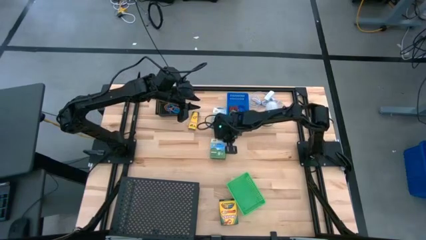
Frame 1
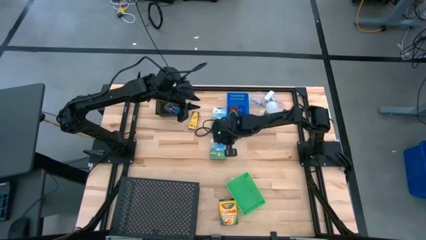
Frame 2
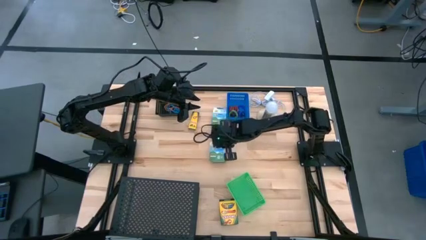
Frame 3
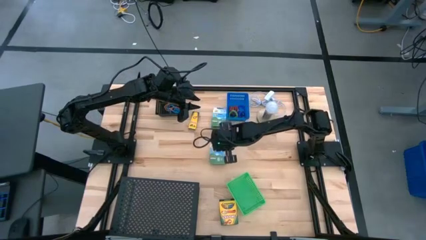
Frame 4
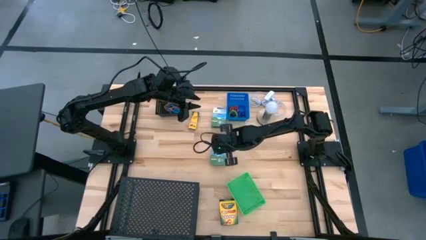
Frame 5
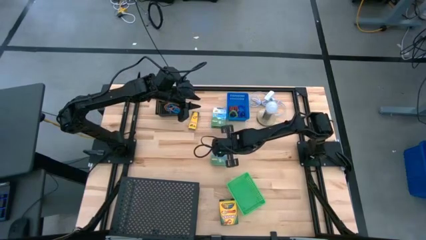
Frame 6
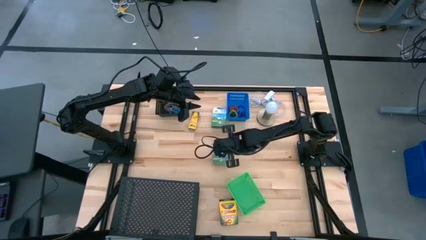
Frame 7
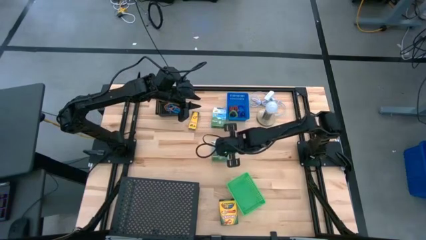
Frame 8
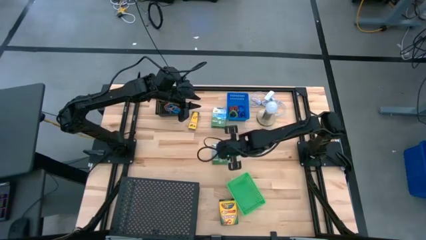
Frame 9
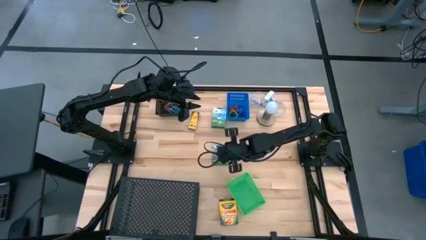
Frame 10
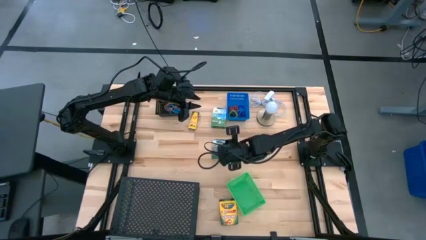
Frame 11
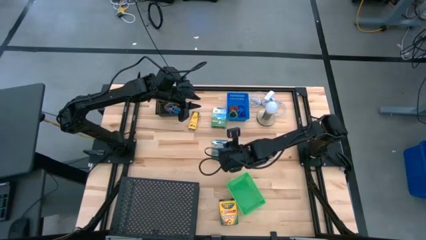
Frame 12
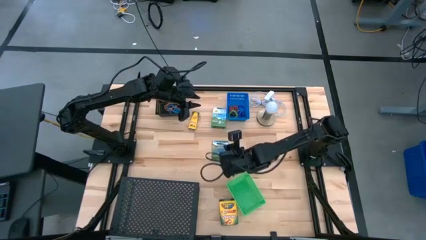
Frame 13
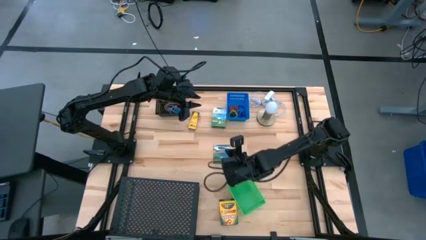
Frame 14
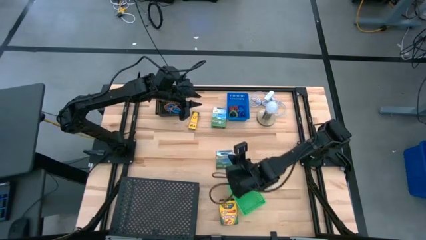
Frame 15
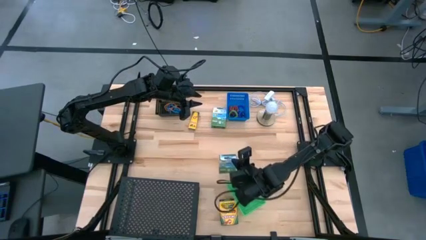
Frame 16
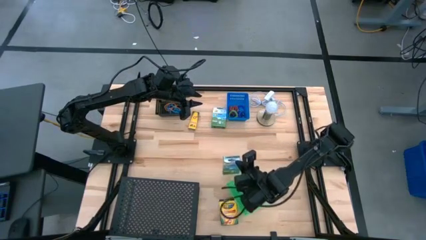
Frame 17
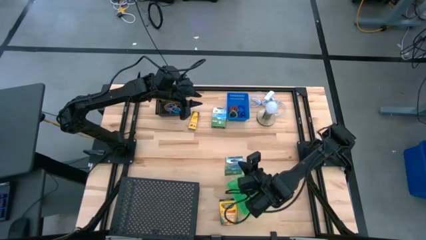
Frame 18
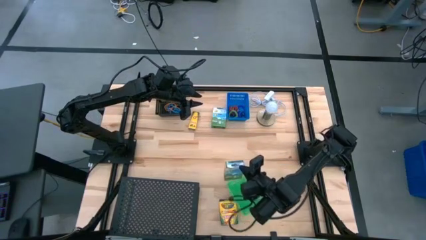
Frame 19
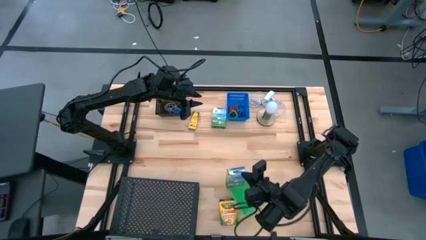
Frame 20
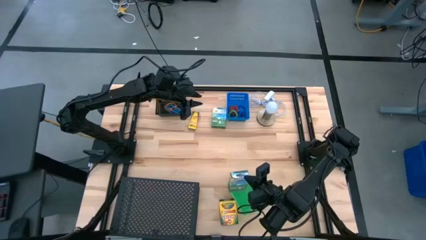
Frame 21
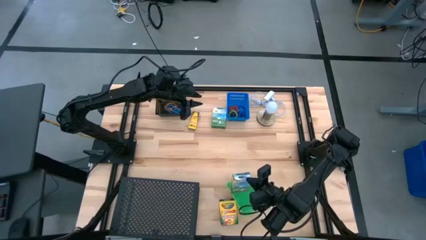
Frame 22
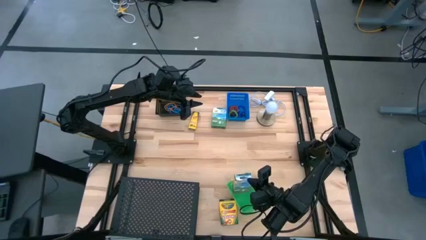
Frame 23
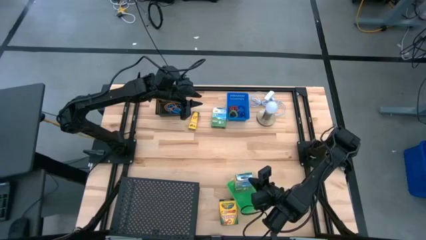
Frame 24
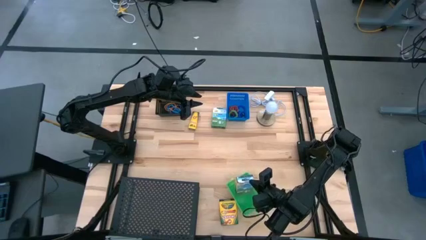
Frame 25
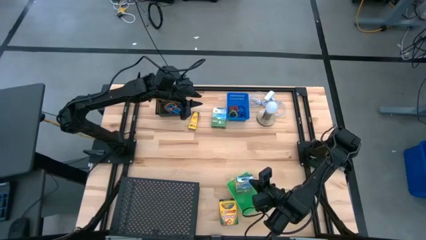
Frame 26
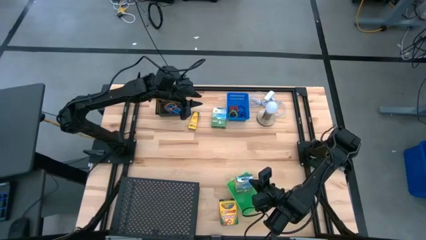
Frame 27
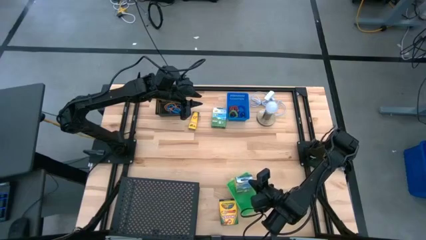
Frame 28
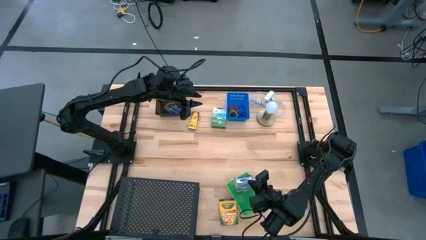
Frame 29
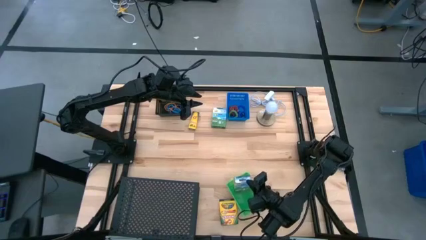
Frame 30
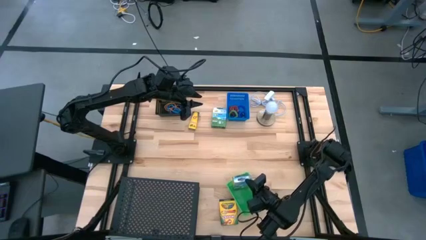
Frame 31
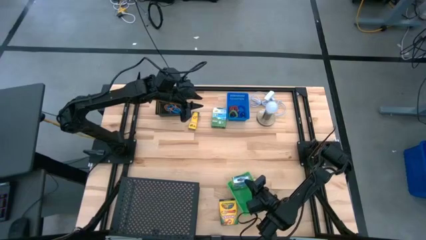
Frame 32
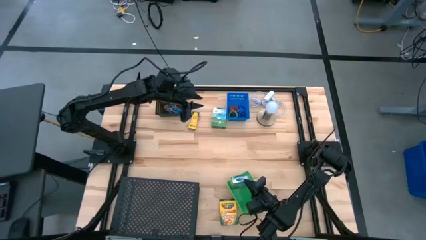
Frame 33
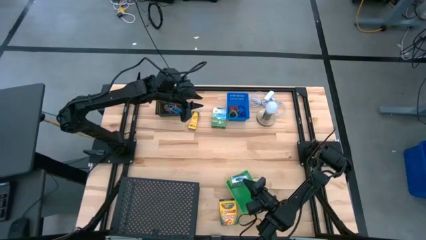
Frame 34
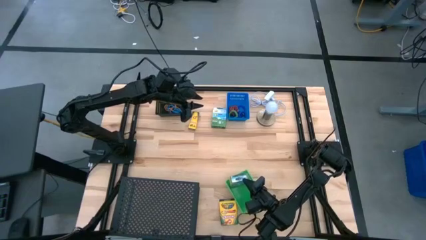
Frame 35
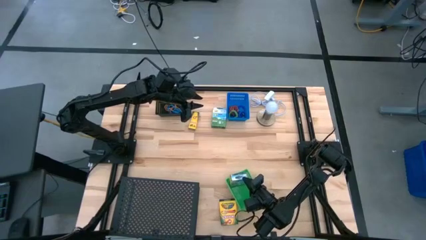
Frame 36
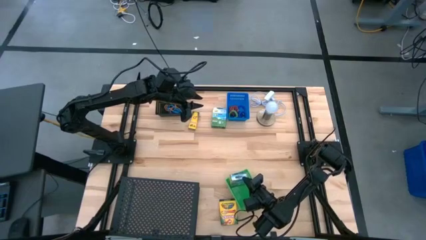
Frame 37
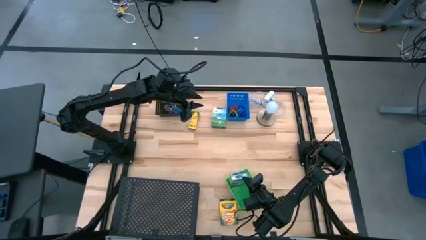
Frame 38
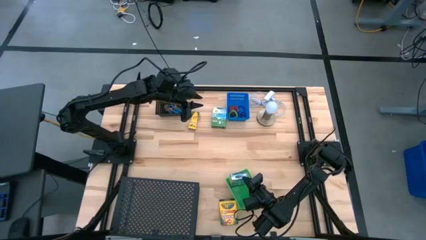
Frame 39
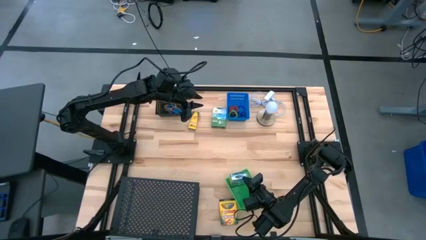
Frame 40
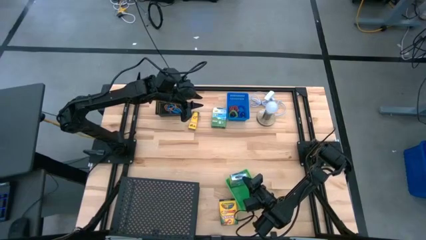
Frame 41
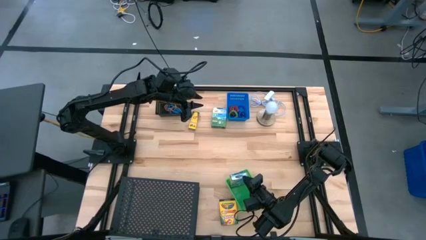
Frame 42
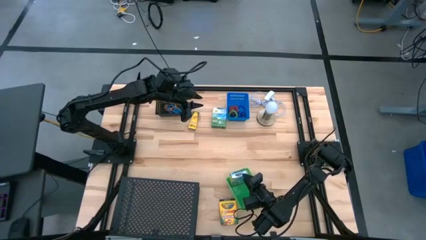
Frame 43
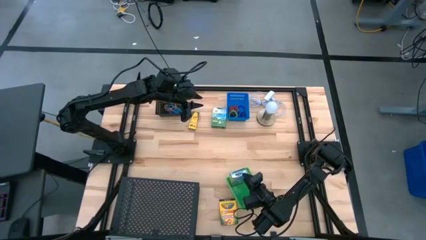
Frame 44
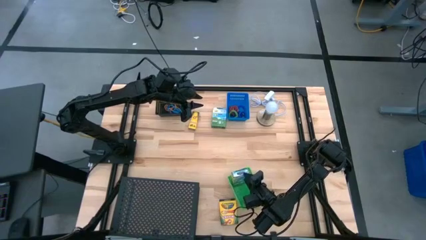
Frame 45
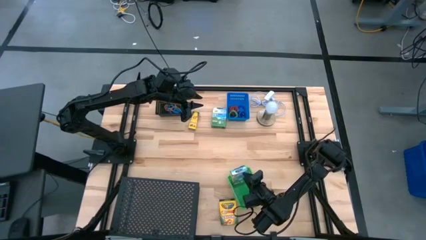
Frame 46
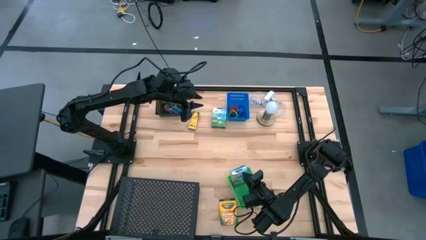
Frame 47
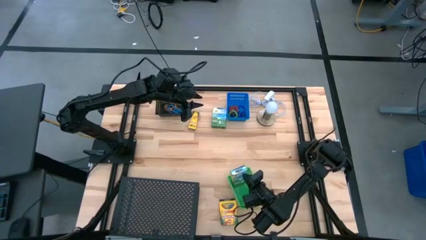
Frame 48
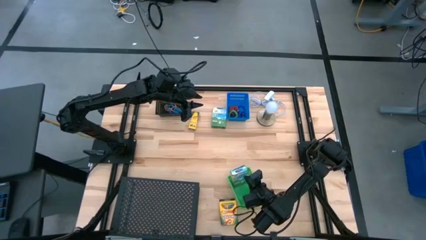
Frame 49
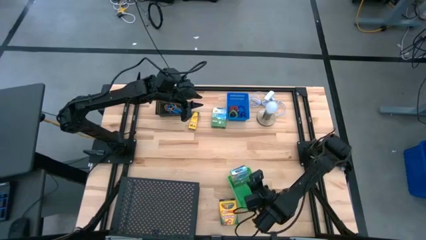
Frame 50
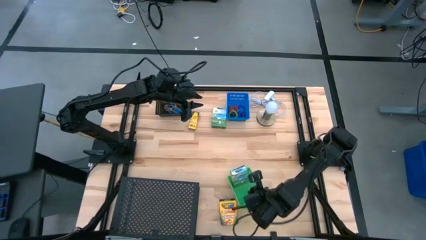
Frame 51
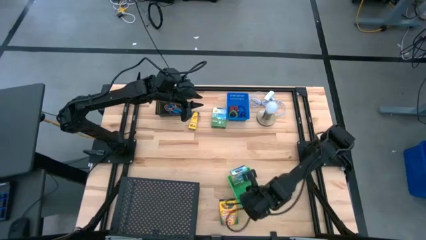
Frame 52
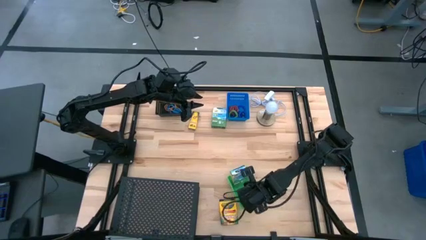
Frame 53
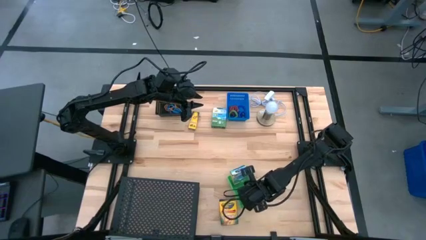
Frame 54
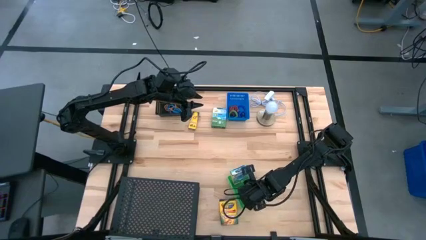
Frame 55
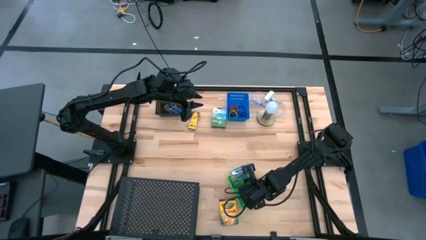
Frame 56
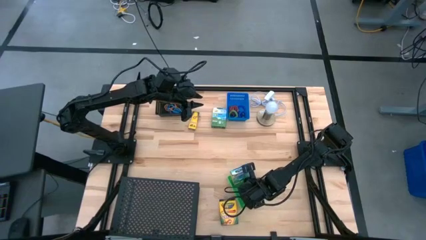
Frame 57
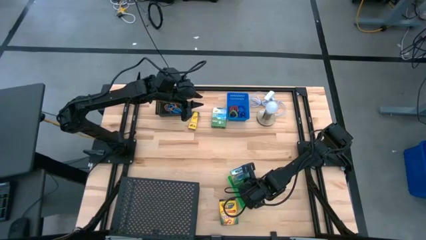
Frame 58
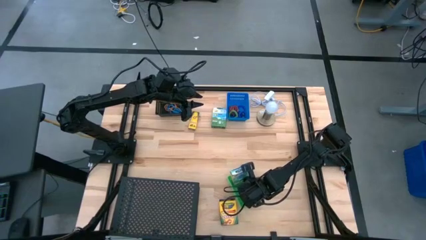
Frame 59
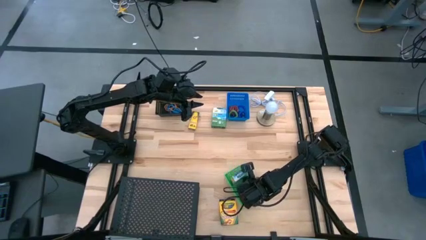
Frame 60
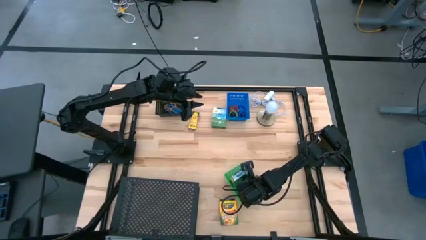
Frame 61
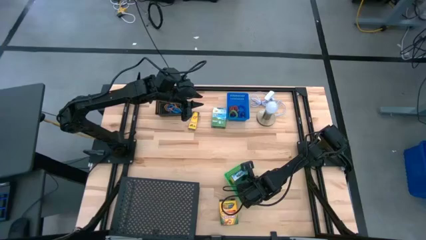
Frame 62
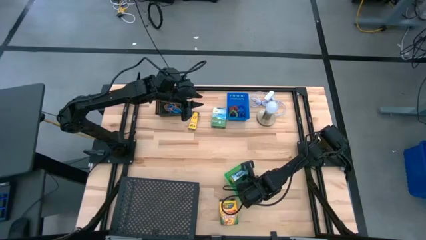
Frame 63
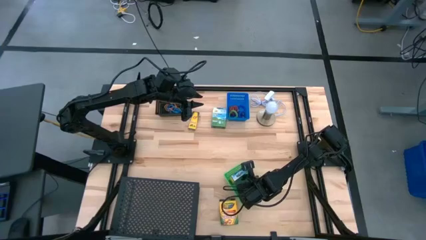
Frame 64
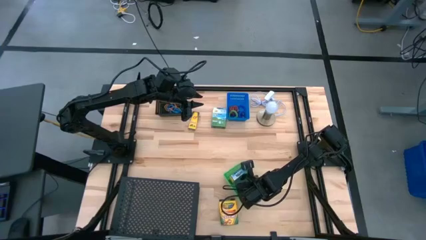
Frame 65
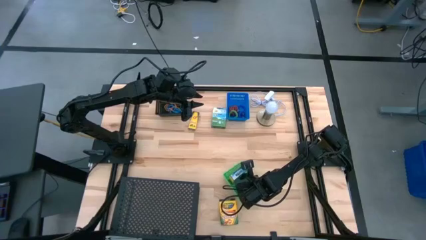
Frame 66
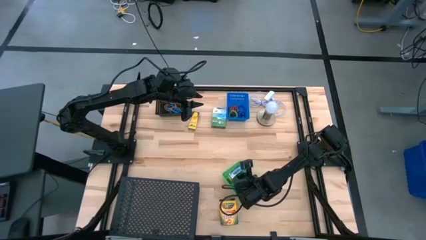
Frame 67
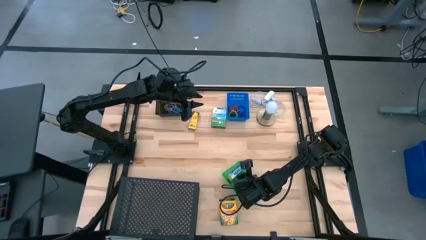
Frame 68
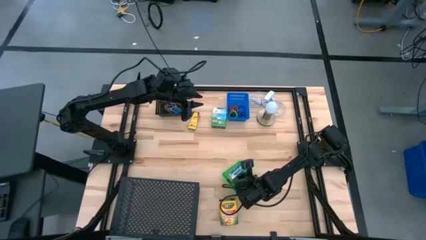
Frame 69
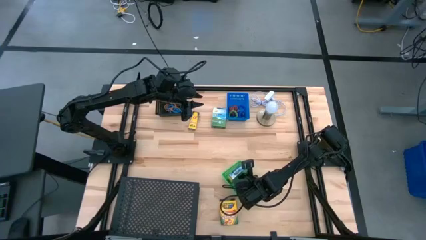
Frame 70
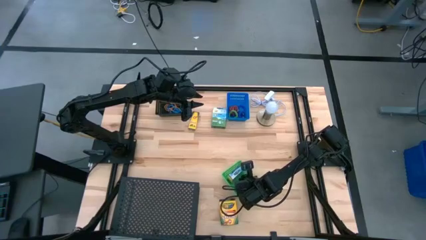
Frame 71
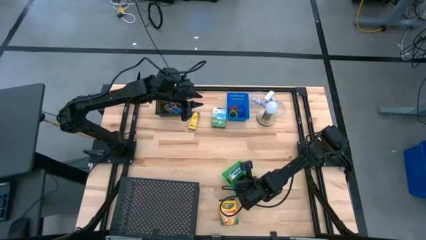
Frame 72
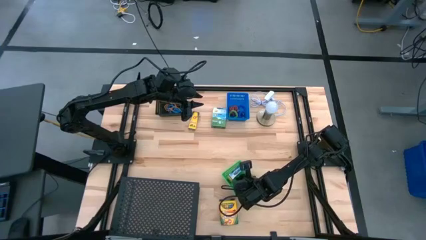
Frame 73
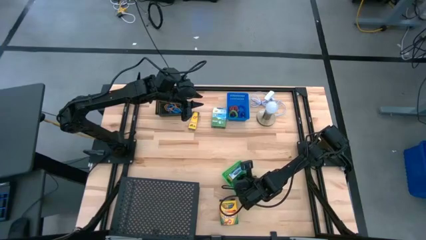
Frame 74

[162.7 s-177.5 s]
Task: Pick & Place Office Desk Supplies
Put the middle large crayon box into the green bin

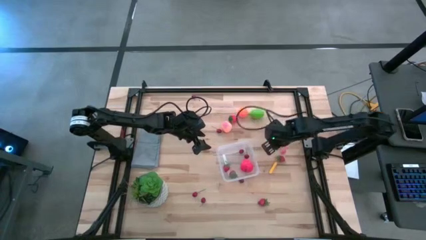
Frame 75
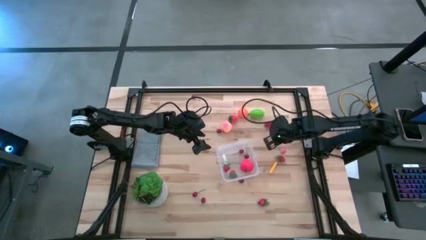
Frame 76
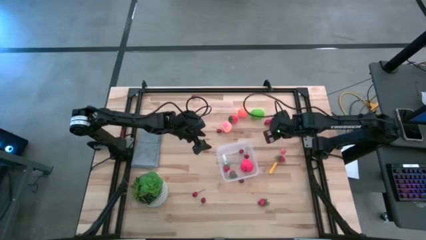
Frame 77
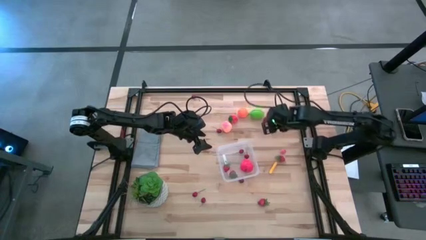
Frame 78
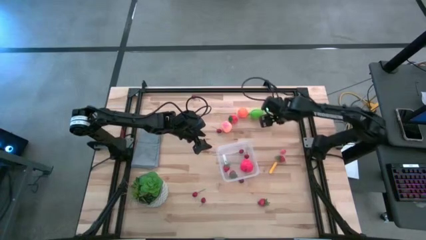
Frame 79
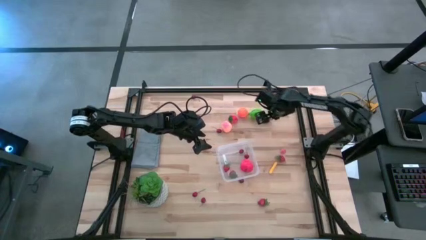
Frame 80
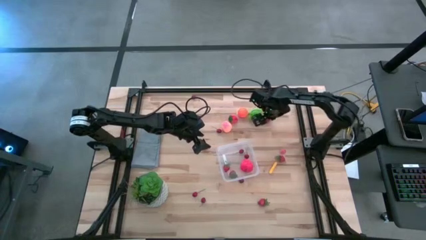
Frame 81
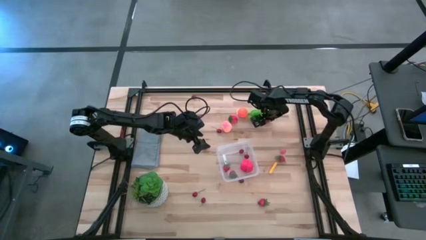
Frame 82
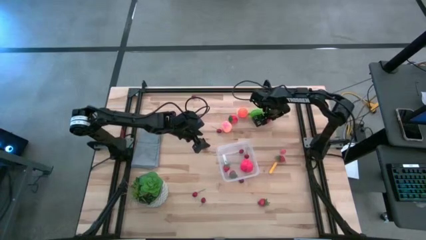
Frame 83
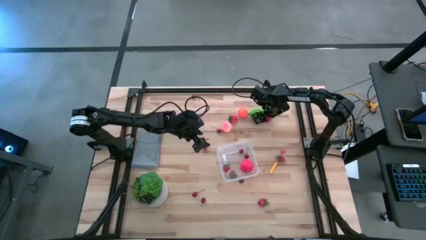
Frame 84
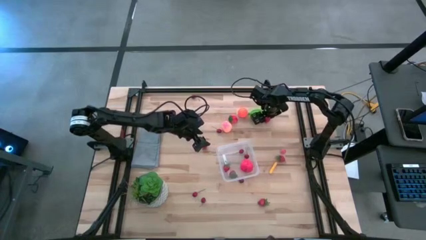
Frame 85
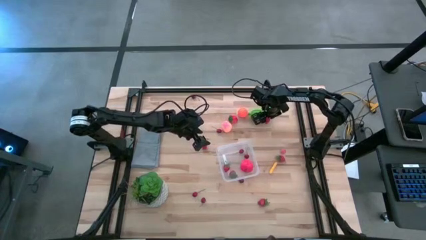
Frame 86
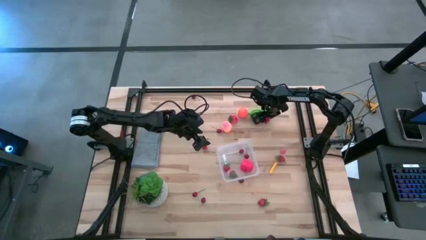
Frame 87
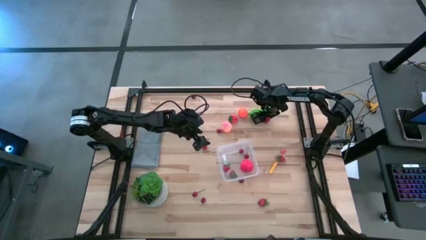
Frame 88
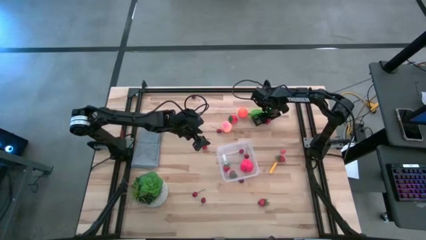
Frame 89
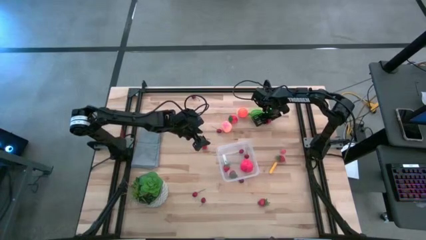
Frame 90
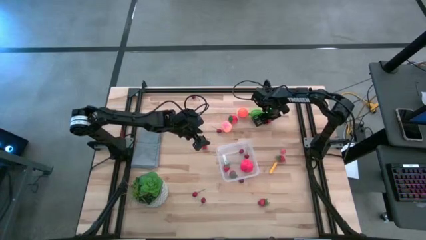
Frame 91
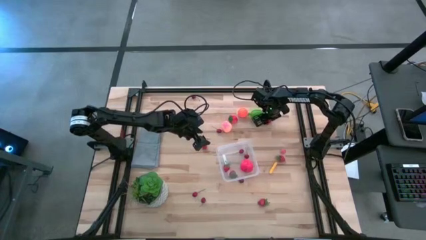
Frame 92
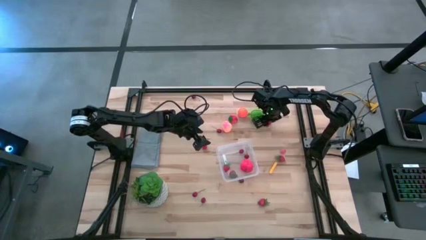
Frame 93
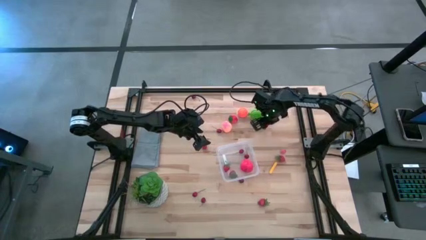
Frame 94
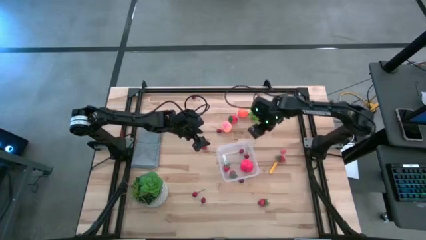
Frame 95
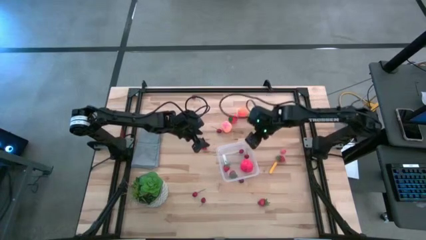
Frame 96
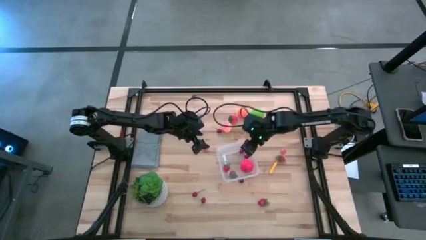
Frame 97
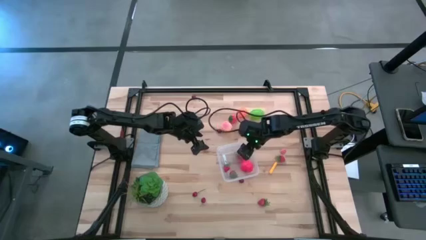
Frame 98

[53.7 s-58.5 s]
Task: Pick and placing Produce into tupperware
Put the strawberry into the transparent bin
